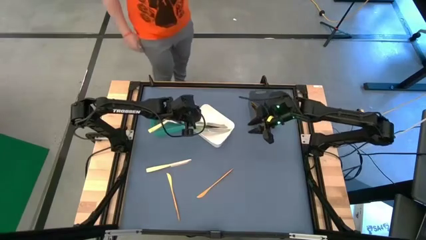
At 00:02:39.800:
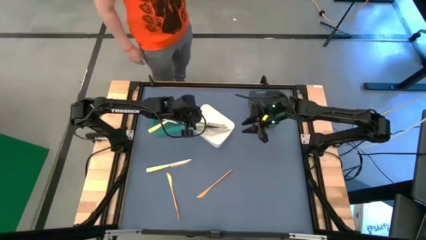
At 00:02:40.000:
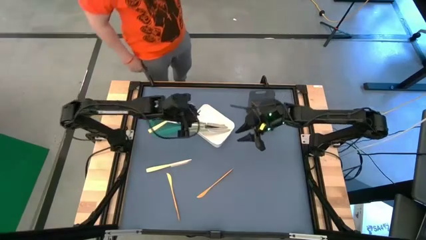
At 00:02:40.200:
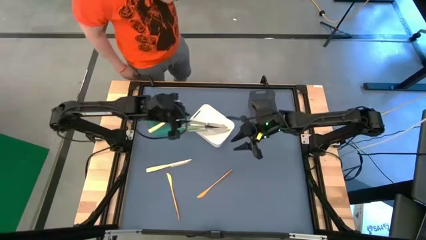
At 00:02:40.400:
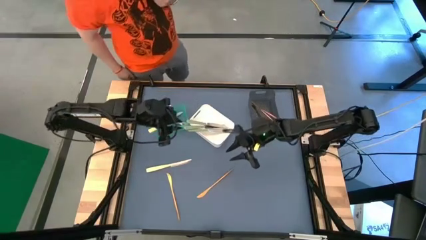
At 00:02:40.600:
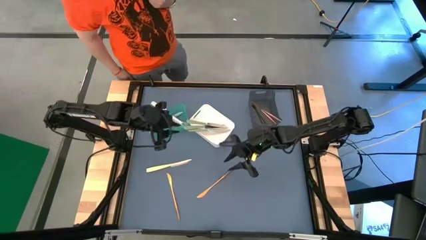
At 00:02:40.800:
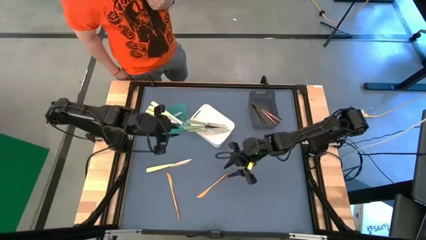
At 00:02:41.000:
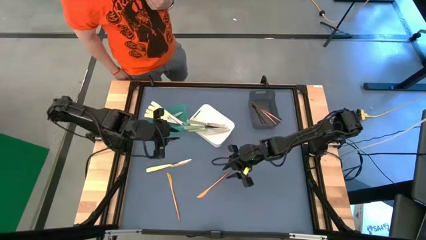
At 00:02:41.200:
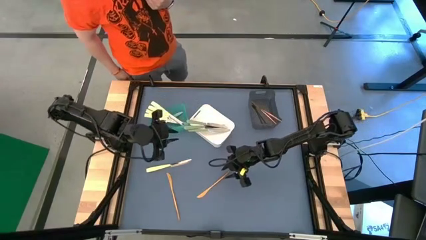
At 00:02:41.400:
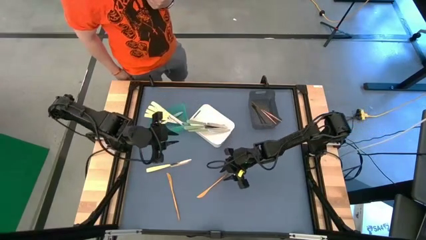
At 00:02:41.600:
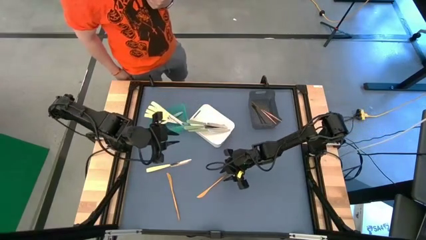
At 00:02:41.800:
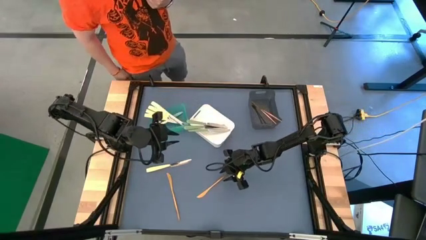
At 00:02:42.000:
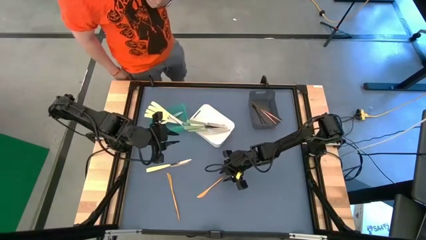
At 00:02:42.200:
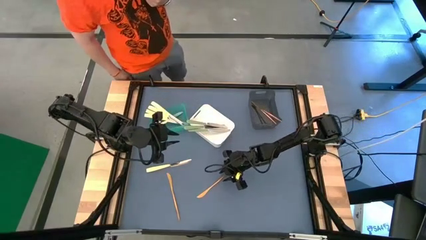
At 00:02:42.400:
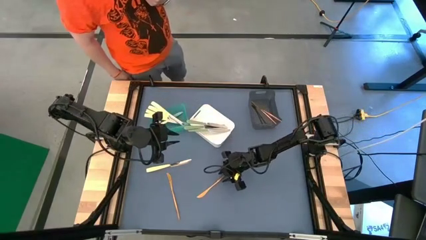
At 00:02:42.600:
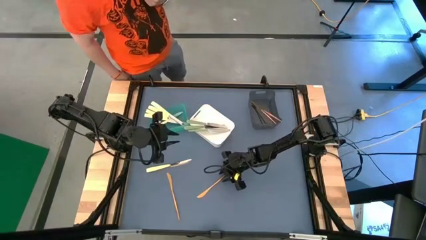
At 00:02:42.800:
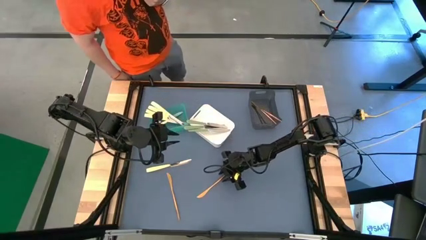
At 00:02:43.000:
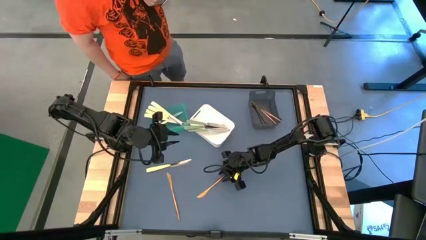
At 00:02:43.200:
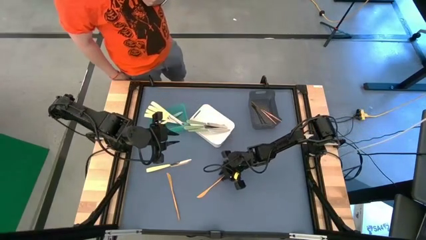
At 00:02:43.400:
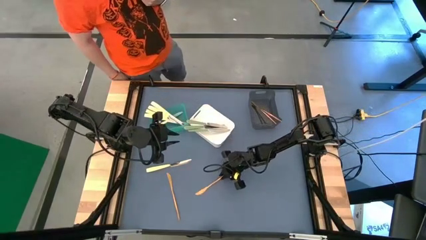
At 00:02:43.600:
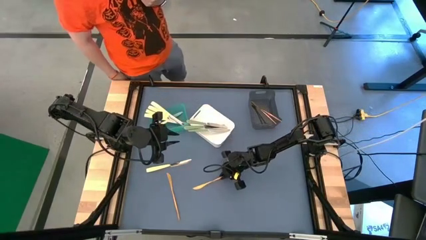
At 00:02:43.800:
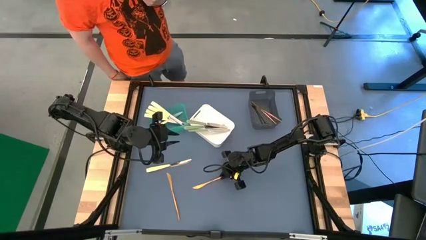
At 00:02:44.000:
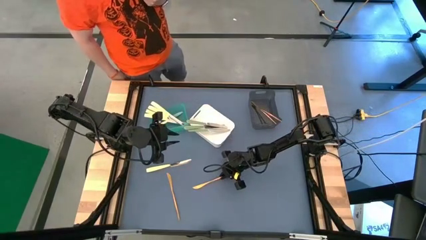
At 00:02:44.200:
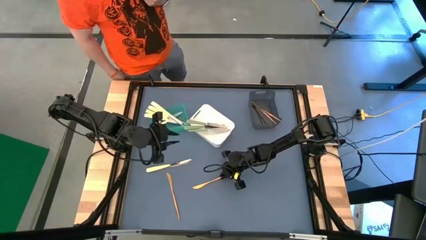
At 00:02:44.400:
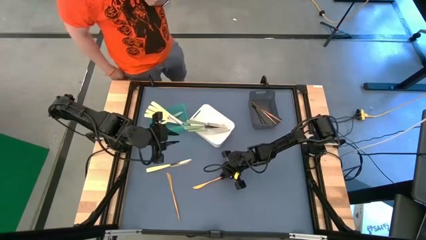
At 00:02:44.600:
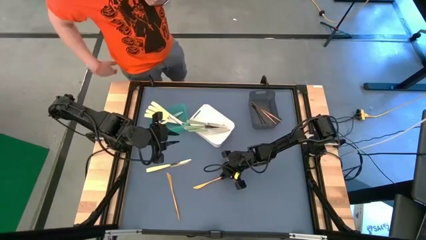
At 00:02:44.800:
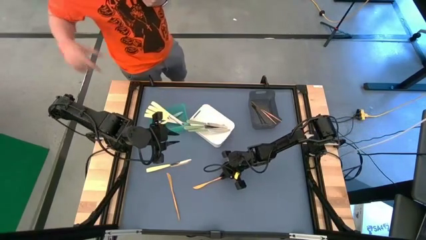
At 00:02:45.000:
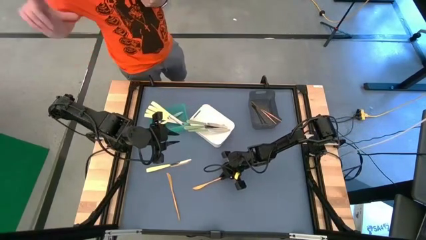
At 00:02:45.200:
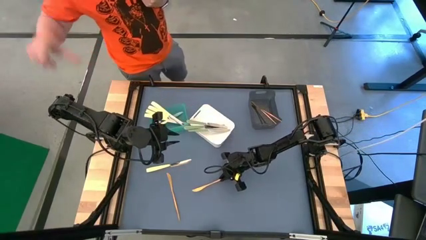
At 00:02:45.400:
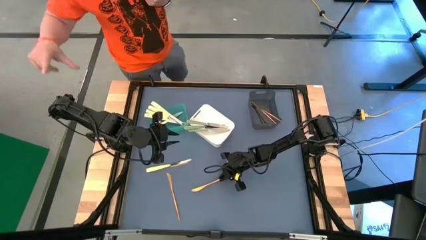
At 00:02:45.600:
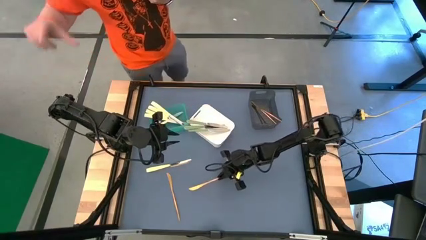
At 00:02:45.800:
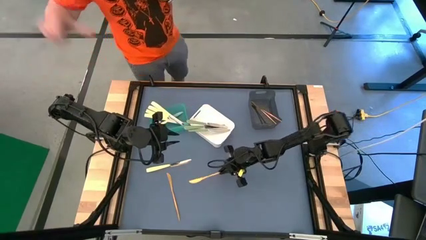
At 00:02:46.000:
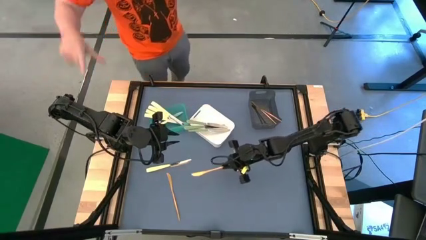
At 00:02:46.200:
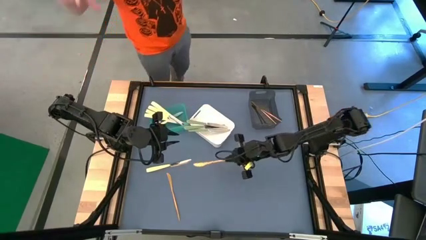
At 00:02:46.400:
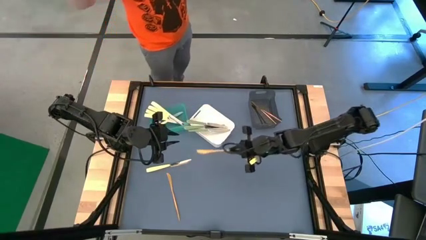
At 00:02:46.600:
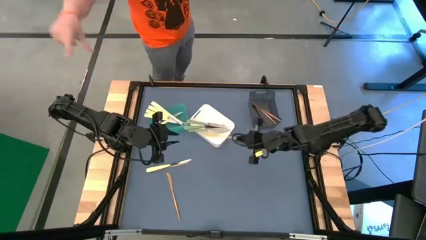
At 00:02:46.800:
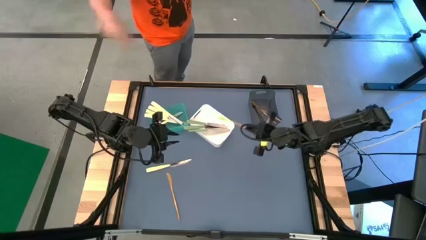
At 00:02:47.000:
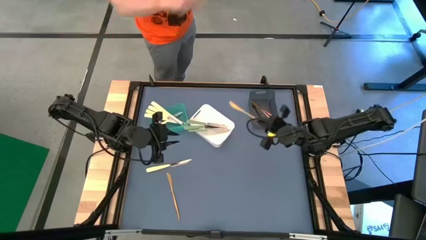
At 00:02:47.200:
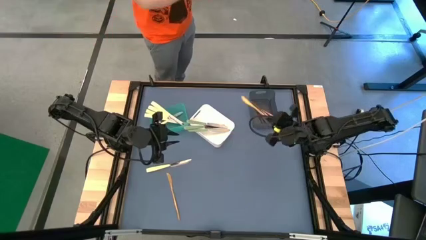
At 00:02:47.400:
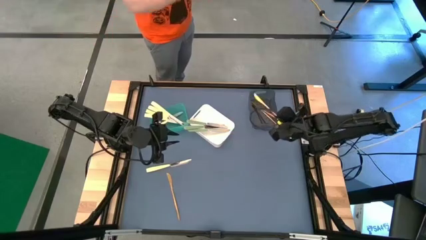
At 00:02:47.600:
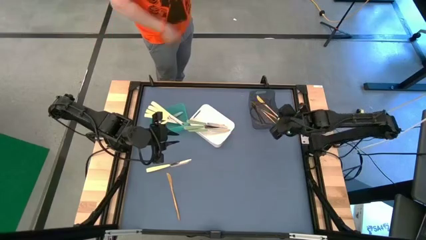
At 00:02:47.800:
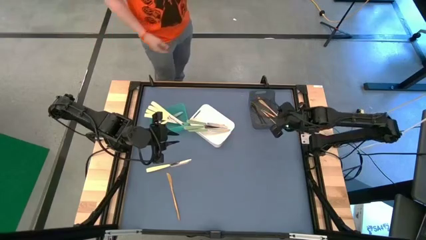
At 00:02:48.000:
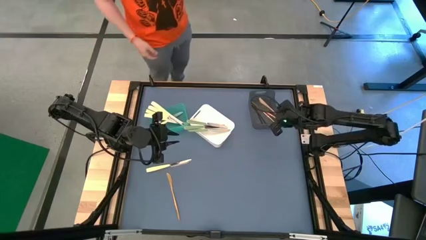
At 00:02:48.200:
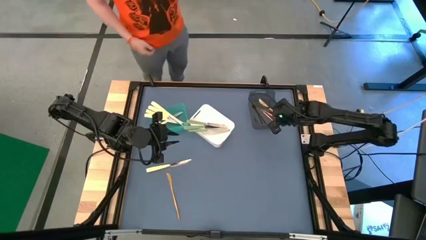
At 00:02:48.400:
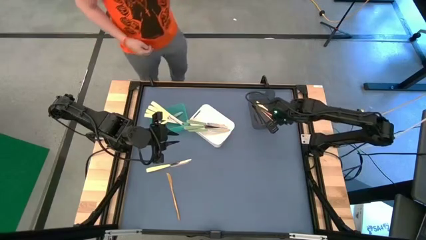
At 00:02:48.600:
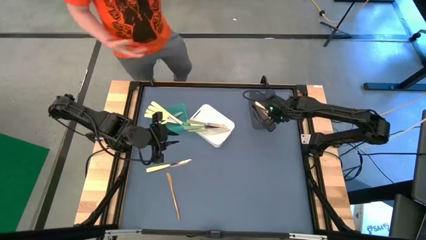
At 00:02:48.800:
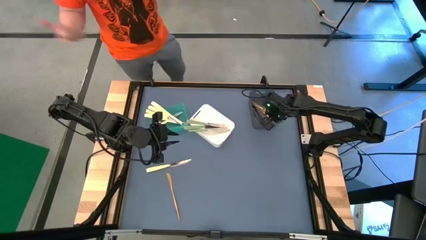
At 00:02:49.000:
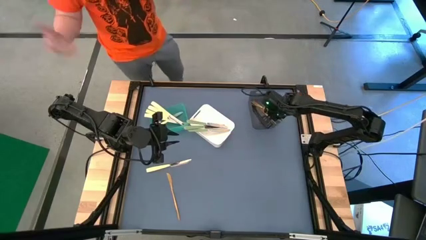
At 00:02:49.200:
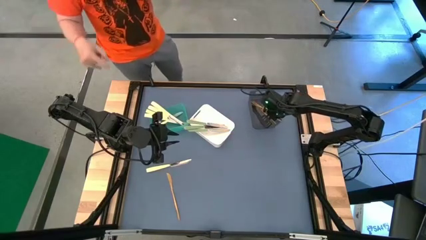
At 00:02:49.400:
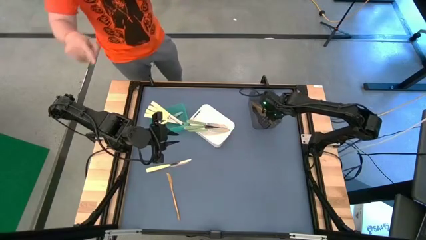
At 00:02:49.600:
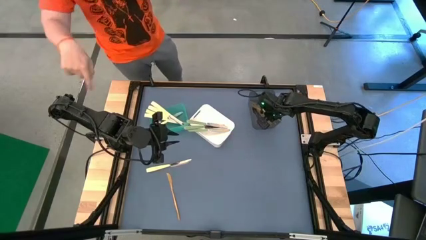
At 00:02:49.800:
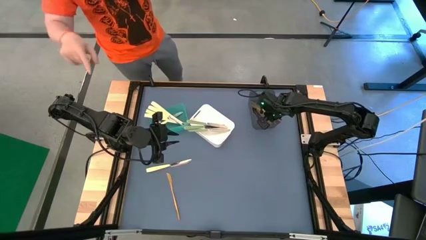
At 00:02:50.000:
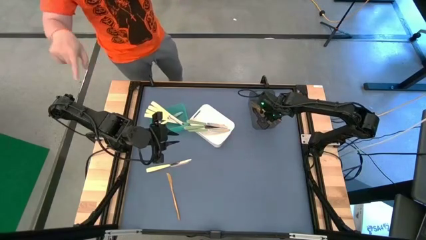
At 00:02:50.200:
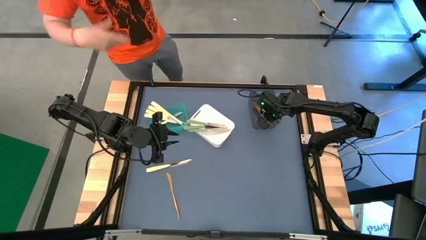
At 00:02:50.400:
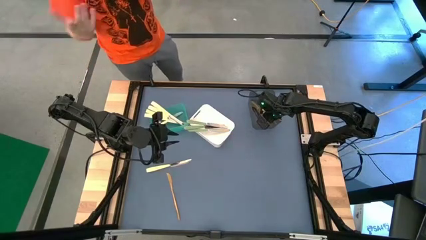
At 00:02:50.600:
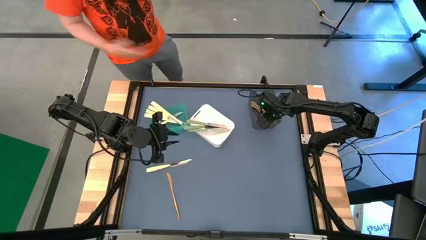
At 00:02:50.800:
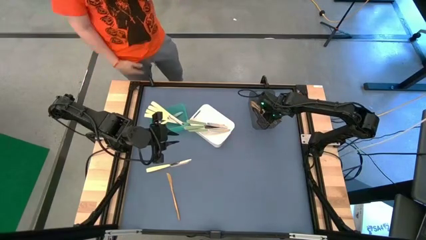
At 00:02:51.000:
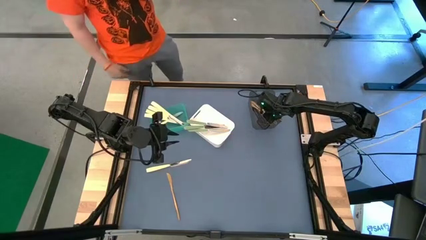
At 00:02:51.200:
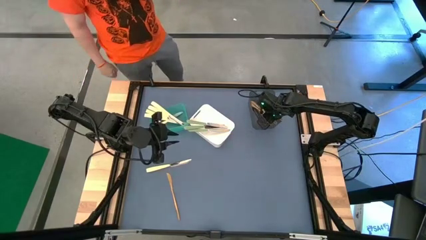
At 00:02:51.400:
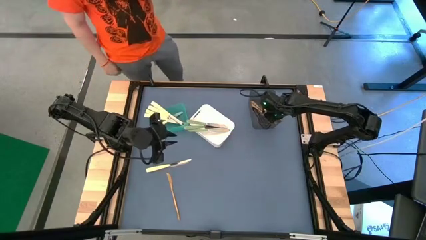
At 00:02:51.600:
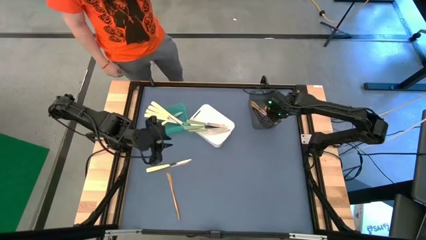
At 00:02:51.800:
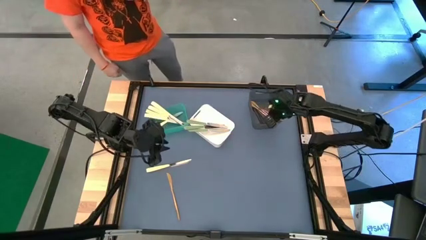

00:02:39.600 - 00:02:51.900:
Task: Sort silverware by color (type)
Put the right gold table knife into the black bin

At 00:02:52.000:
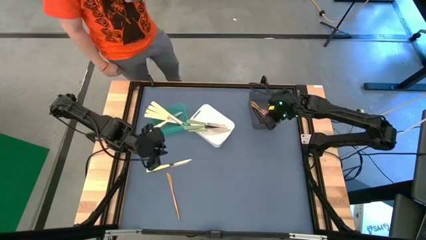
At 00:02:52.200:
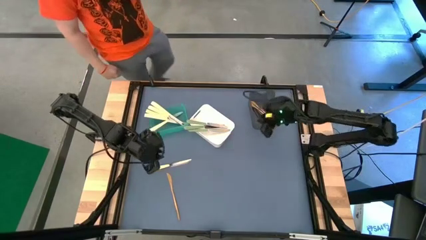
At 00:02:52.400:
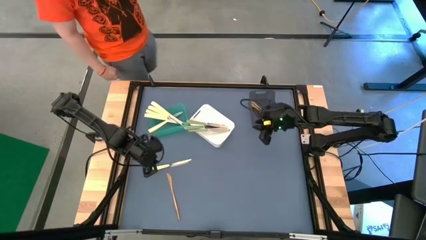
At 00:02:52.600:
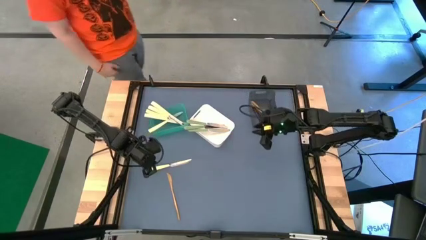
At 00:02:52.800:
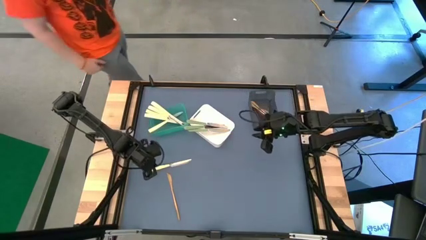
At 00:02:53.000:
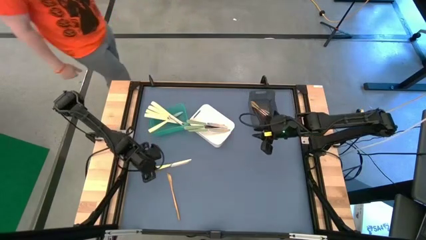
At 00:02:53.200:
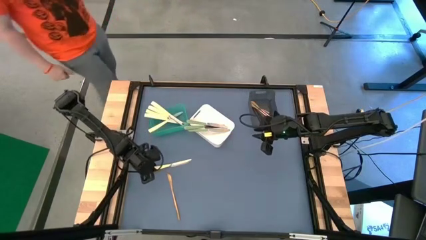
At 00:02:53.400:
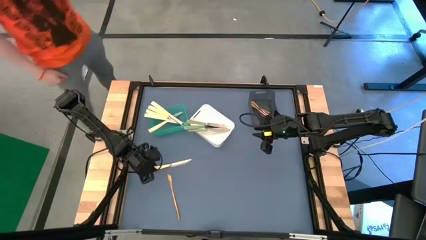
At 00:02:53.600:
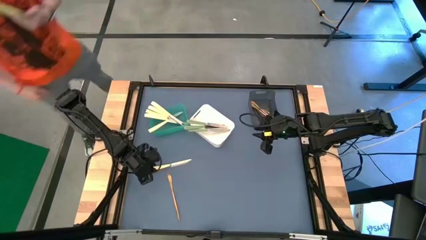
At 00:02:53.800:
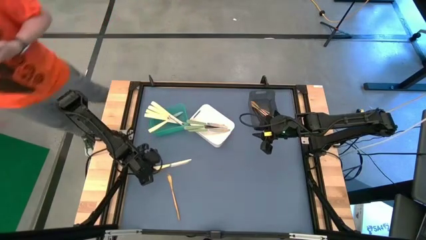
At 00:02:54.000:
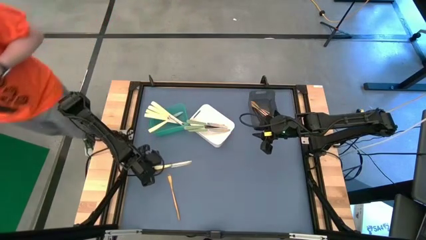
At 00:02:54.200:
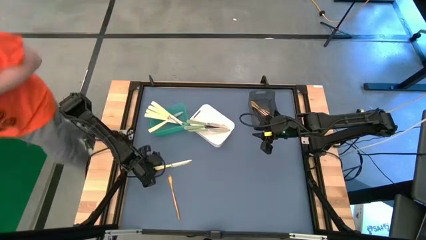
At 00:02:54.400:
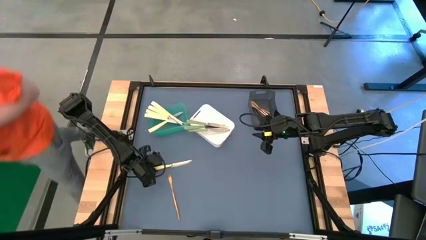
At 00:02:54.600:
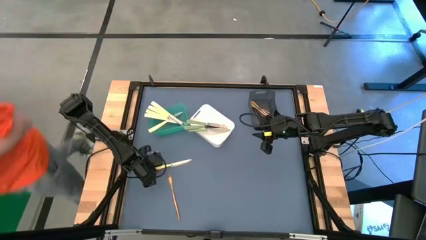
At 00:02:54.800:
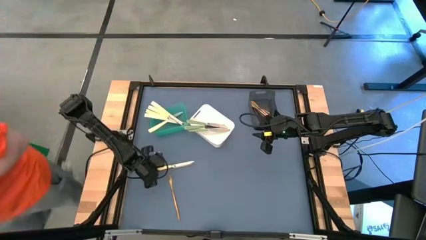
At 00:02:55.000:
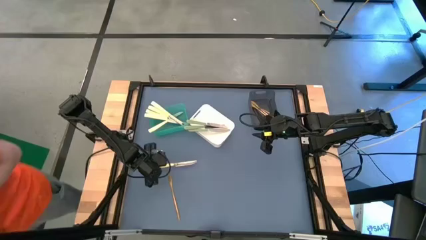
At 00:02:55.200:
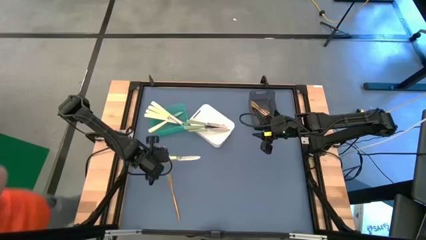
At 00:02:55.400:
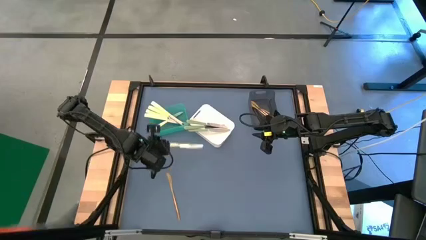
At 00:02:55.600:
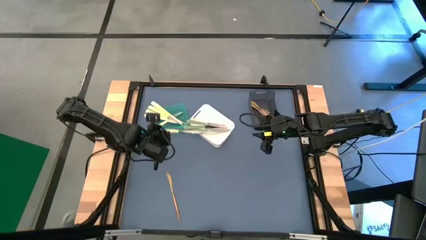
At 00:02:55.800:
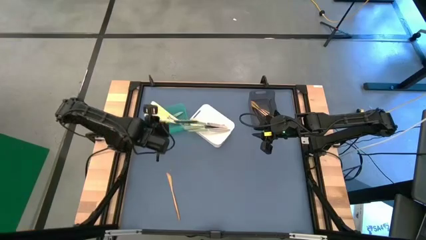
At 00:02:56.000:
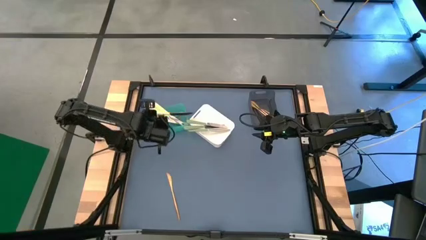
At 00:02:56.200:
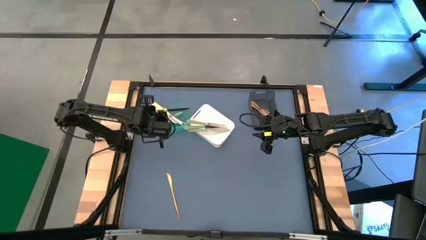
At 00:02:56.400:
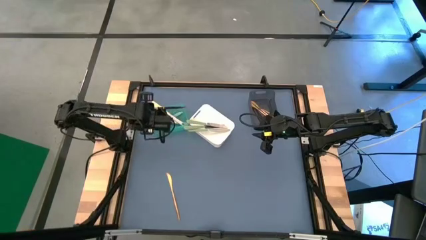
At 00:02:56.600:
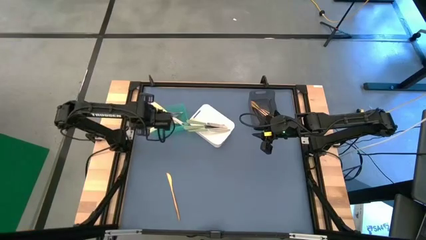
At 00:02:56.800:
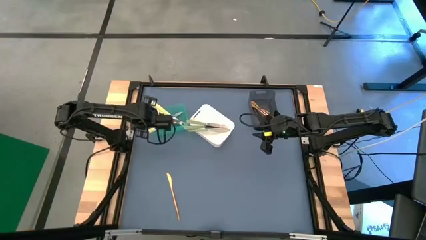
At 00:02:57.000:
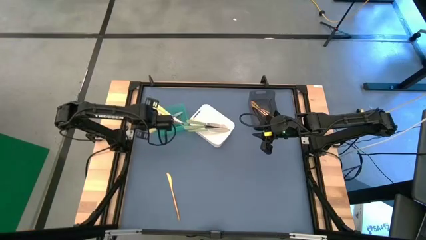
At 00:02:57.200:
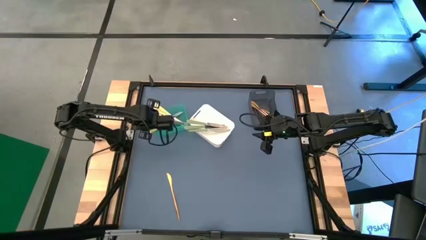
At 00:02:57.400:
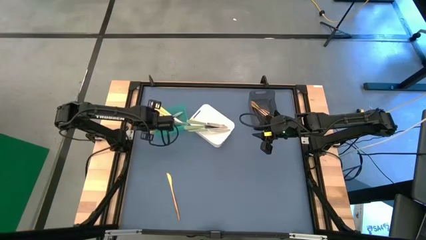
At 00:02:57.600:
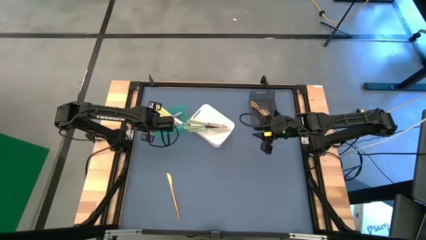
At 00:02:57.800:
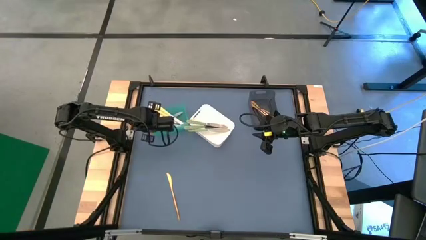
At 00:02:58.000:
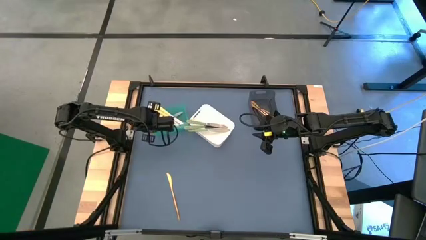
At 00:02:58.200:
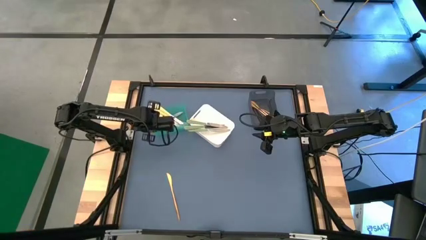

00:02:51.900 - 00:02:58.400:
Put the yellow table knife into the green bin
